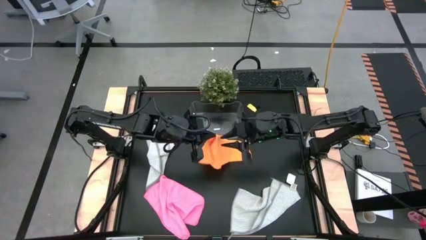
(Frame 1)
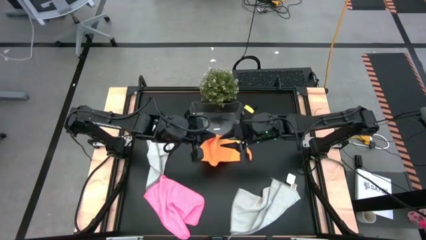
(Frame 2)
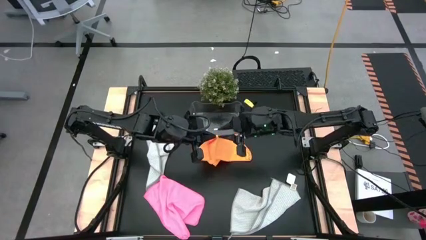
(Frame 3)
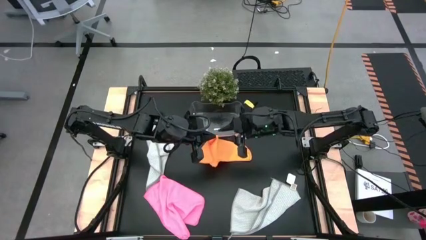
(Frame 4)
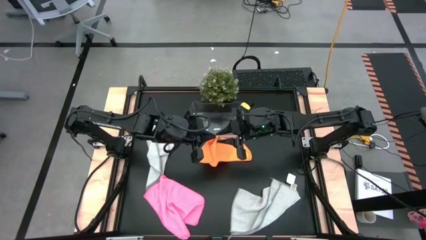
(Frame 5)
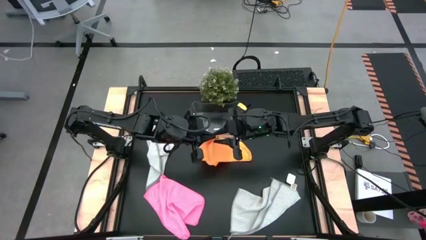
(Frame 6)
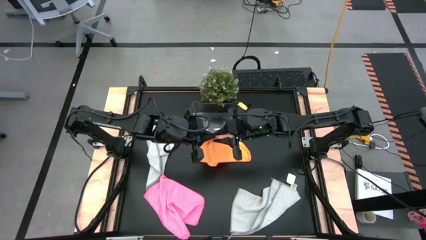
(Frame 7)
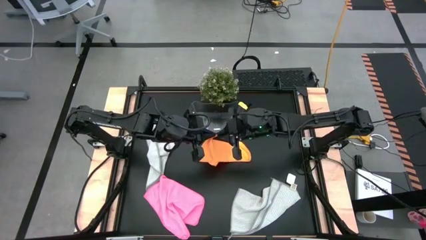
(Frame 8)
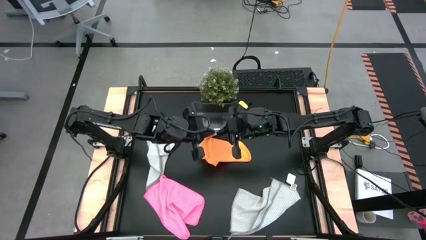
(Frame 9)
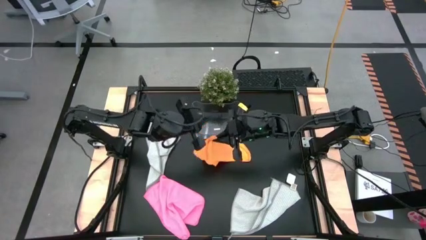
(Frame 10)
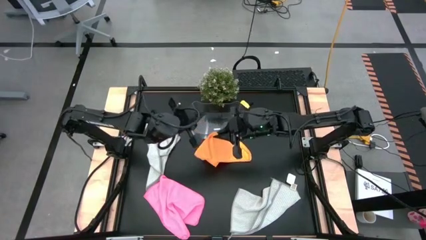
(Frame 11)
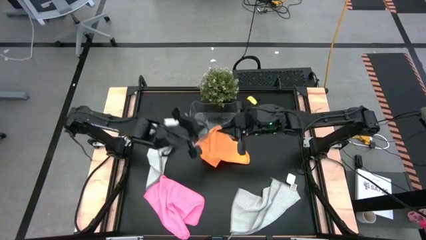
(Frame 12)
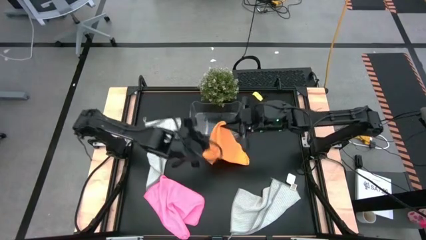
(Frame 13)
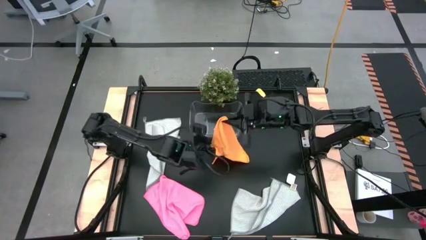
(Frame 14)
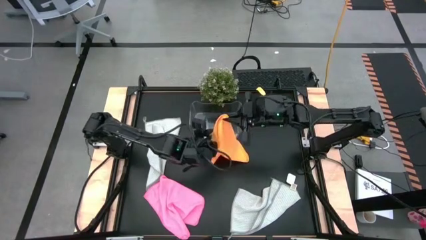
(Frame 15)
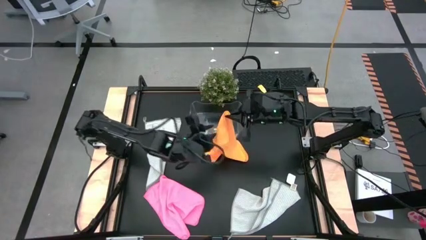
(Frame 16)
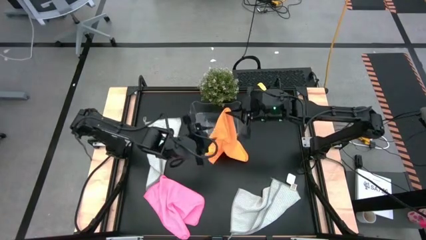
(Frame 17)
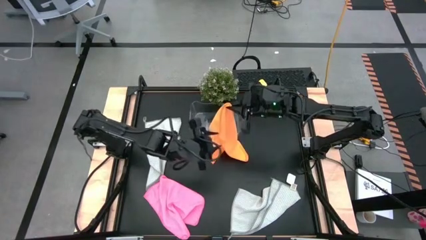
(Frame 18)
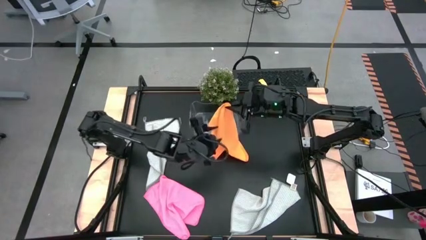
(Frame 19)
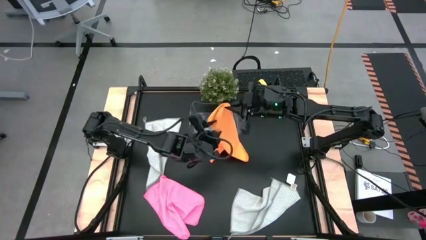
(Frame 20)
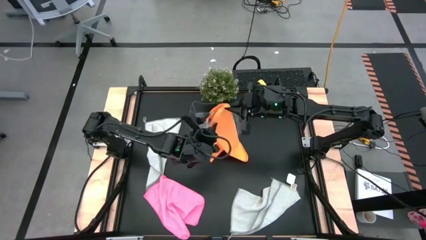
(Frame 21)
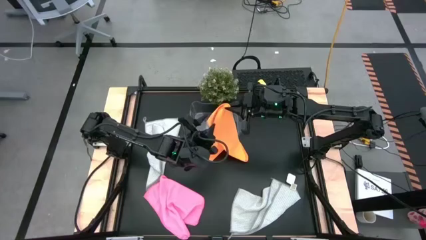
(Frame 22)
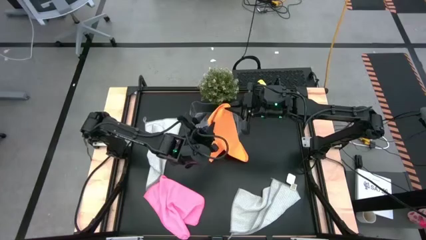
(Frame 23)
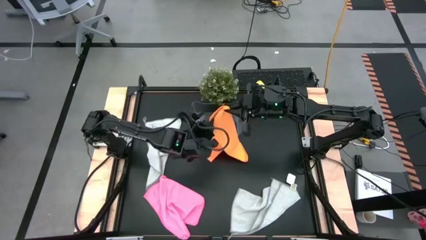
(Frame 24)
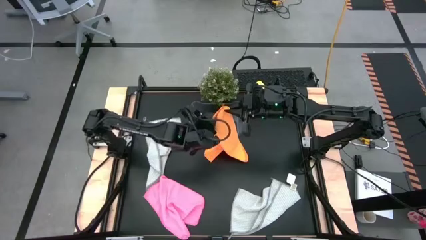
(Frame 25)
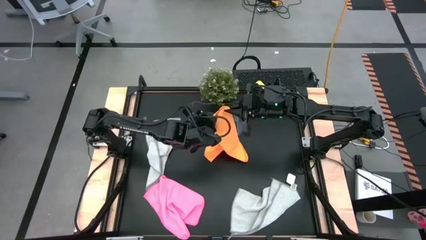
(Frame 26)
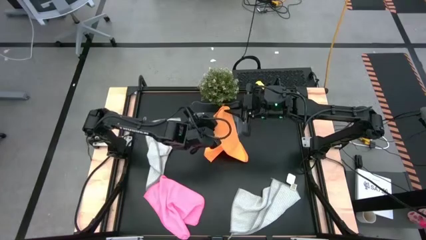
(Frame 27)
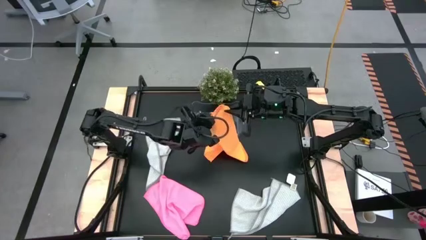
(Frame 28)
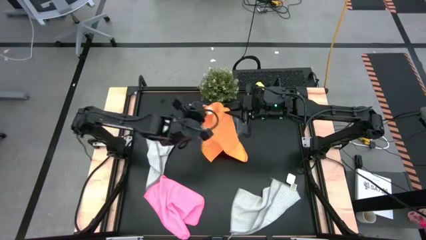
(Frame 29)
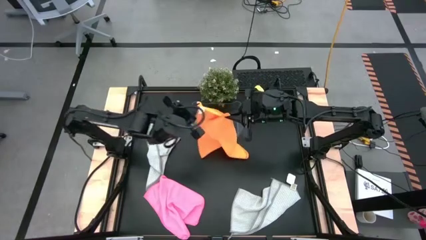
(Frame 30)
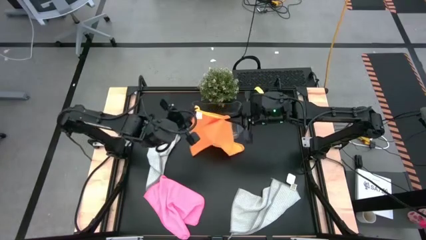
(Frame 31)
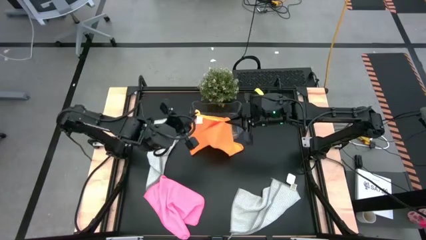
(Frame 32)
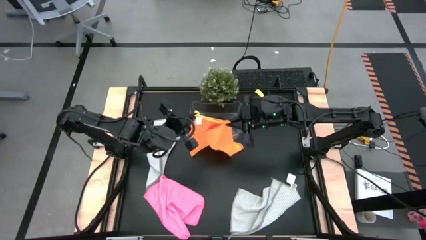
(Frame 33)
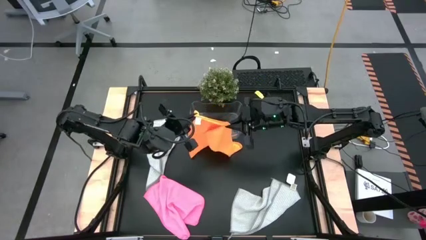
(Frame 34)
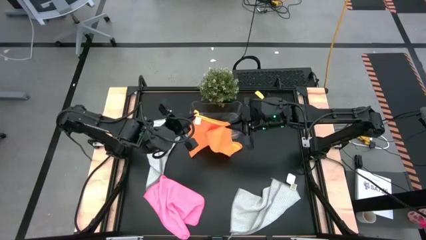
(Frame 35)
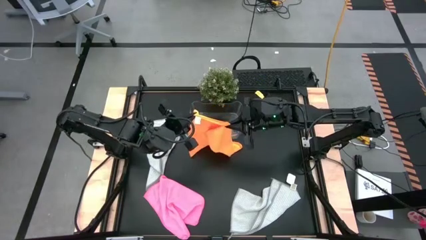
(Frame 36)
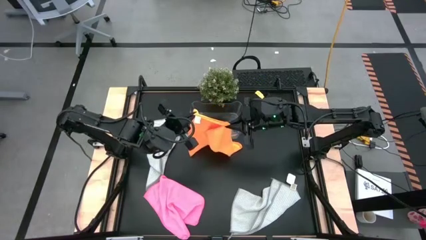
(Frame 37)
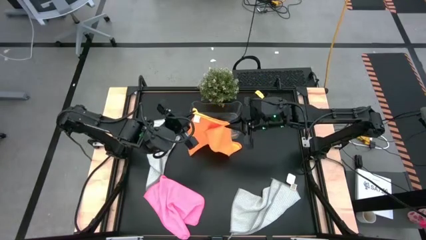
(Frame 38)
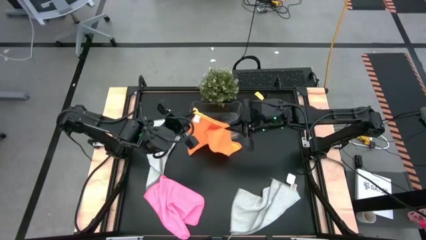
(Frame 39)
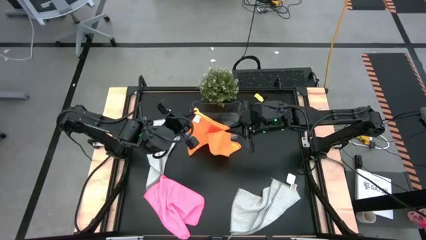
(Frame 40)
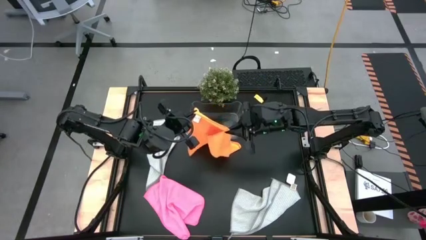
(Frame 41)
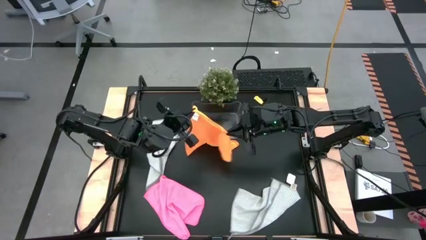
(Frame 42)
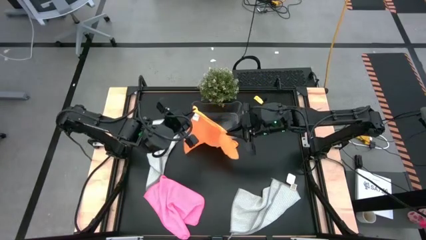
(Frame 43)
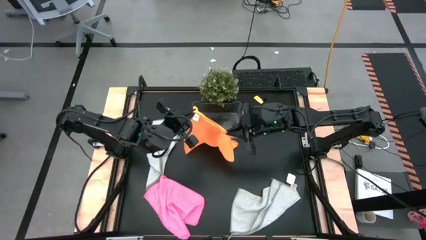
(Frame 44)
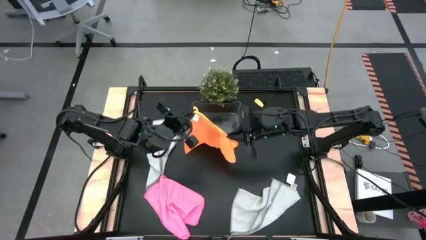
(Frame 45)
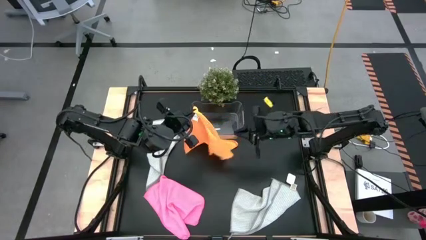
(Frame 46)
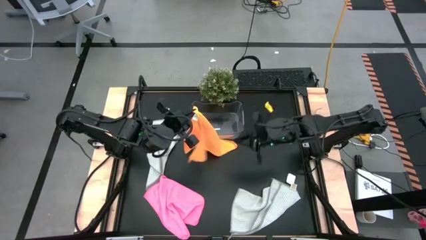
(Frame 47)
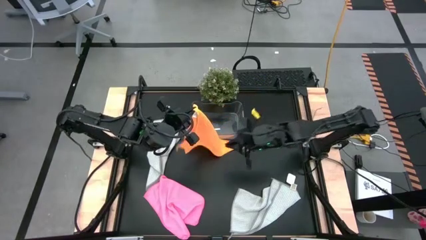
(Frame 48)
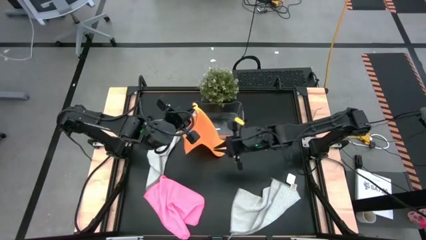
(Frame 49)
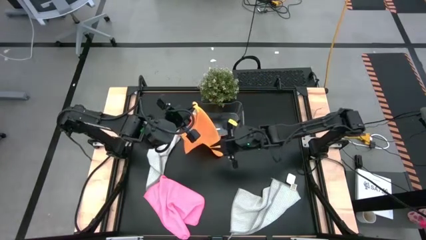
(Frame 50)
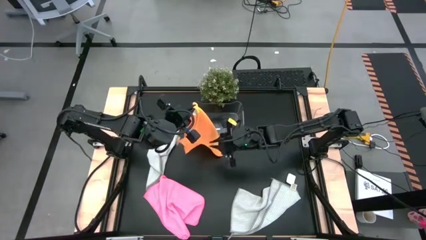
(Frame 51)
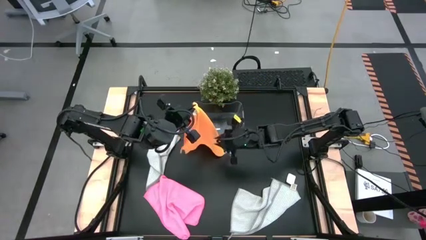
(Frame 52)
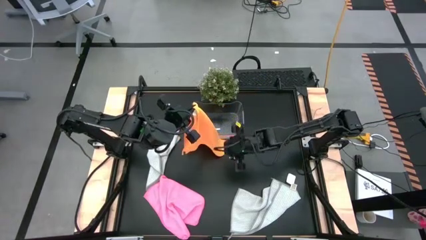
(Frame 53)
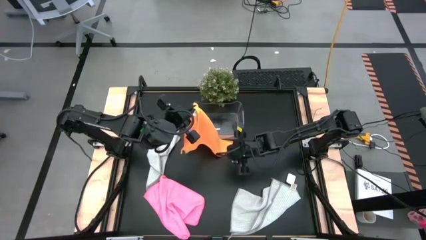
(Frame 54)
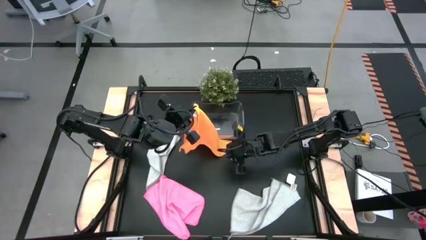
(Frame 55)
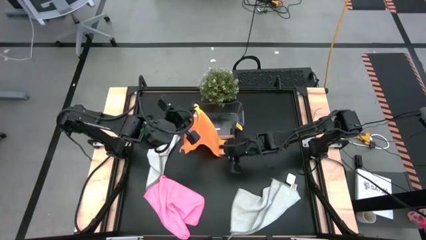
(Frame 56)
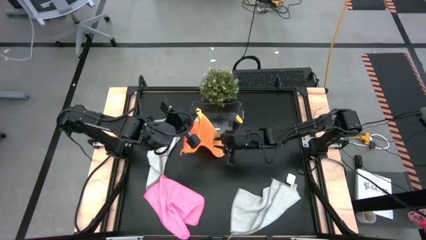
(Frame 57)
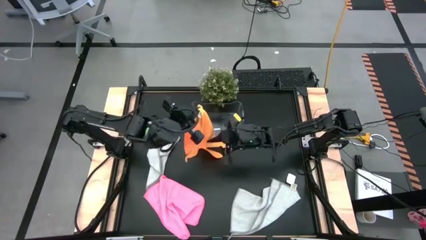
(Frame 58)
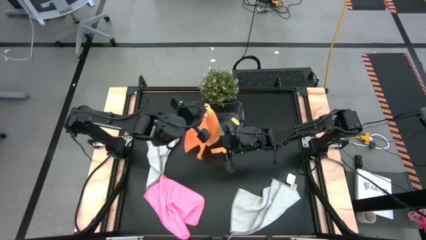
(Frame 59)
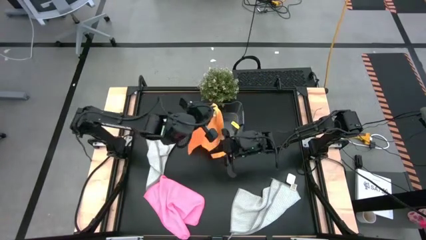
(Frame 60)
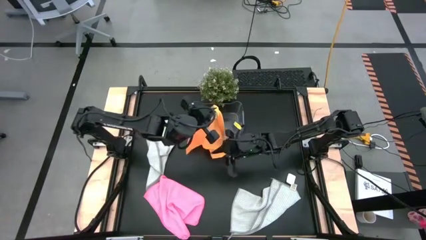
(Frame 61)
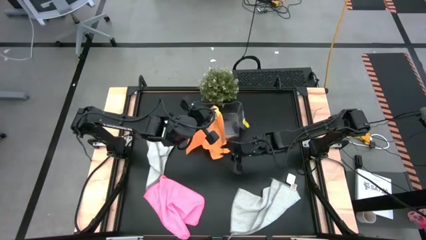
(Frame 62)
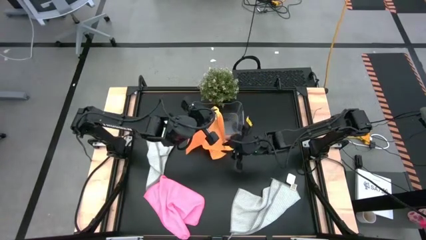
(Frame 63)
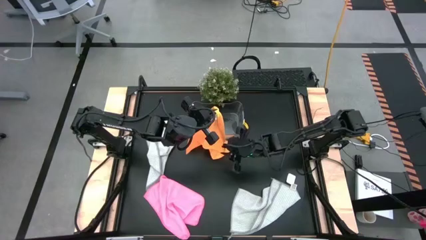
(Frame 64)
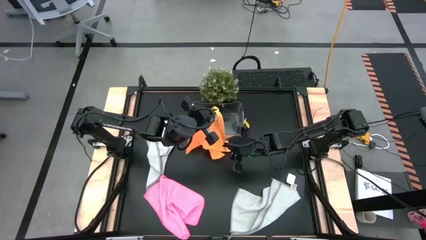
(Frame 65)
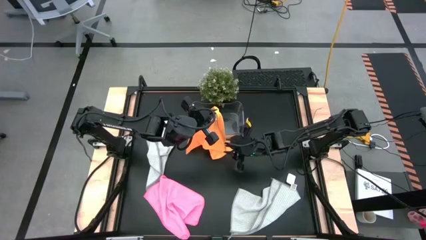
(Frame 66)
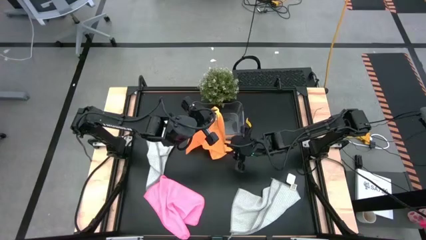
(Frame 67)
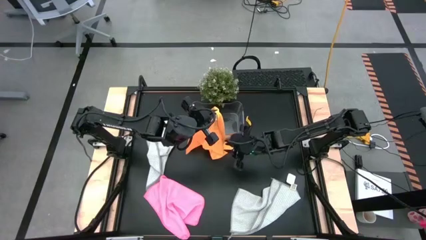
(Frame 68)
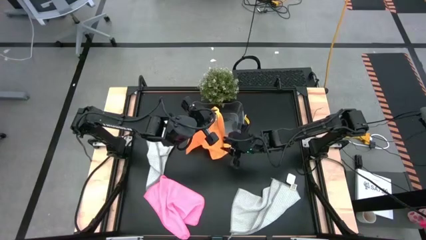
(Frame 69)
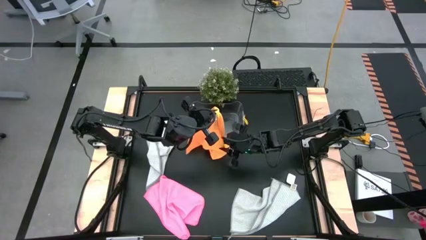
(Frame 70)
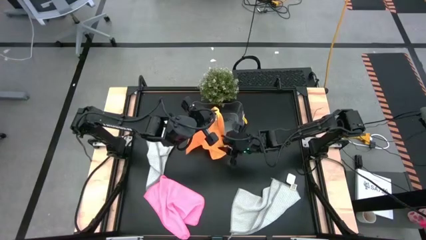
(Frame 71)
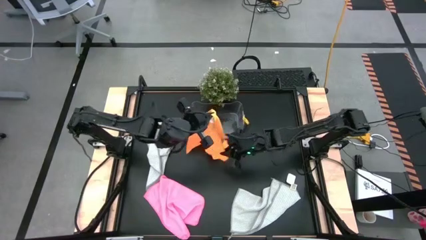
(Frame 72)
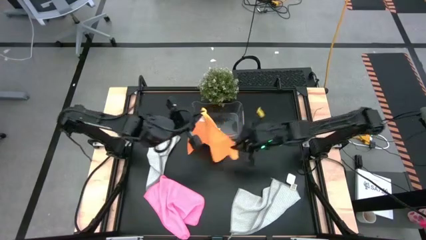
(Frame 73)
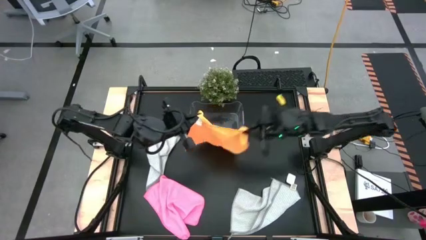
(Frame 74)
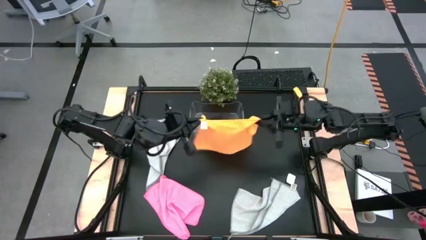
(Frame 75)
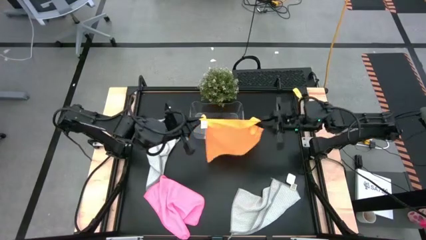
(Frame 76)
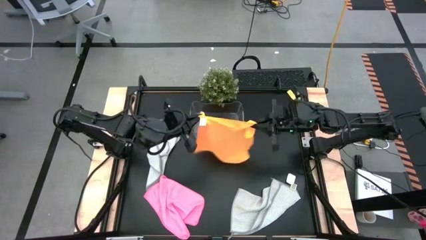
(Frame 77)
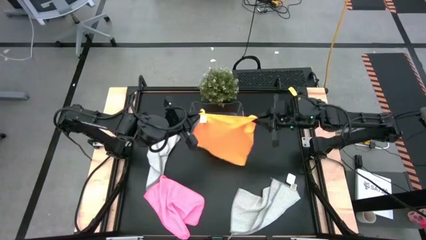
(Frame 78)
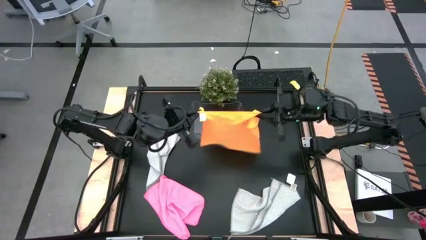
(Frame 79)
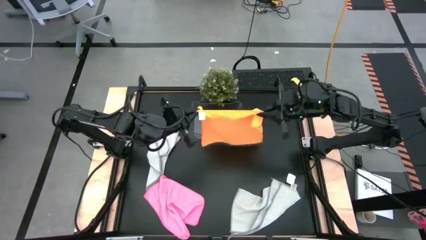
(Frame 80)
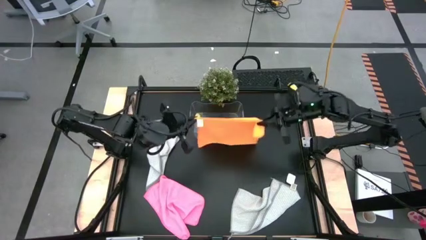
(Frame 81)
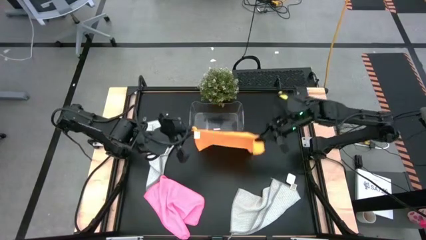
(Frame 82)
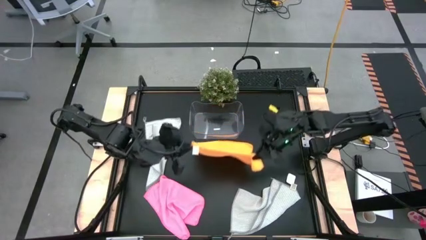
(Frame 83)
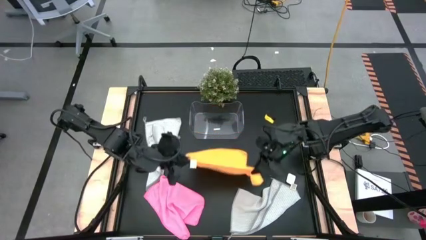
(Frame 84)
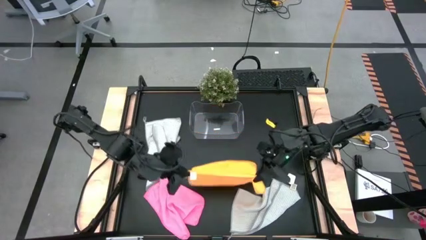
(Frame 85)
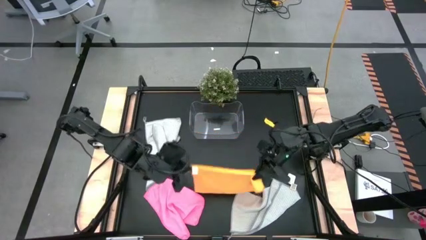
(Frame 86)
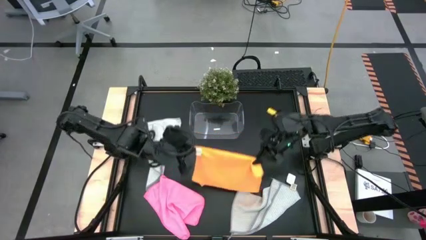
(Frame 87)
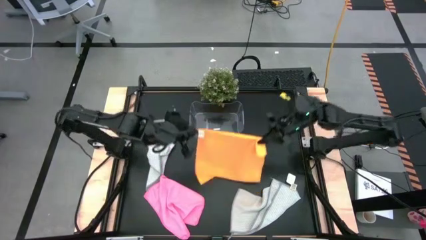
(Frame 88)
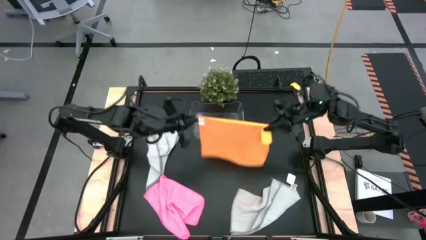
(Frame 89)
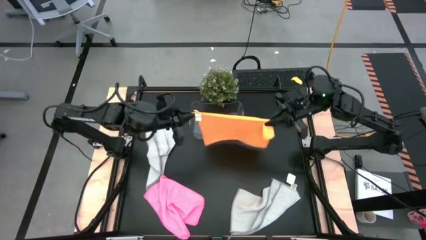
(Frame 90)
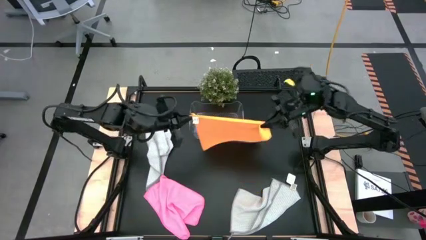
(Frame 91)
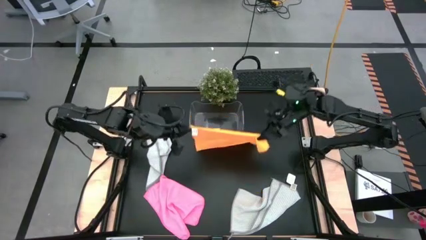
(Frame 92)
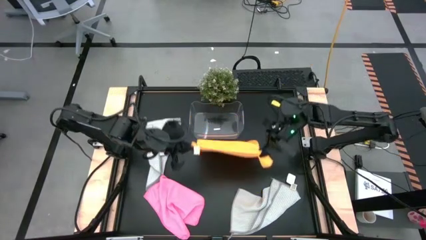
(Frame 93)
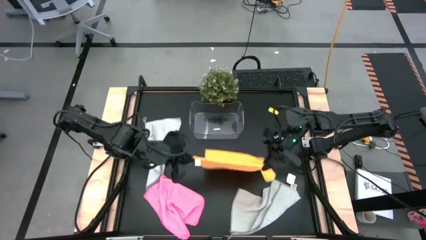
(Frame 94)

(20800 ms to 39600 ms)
Task: Fold microfiber towels
Fold the orange microfiber towel on the table
